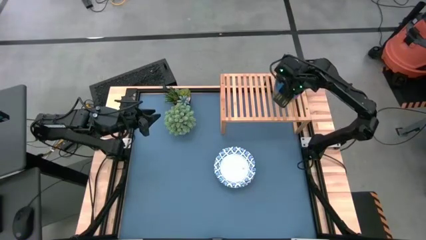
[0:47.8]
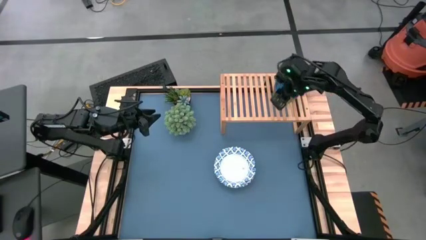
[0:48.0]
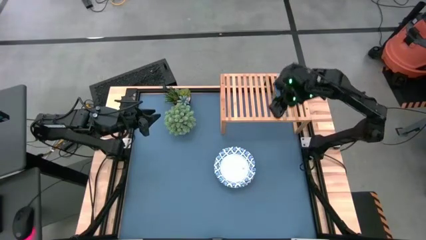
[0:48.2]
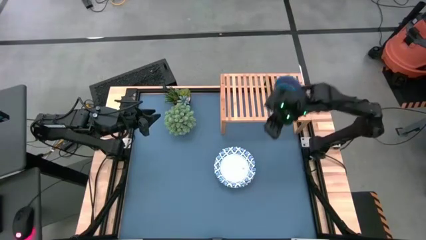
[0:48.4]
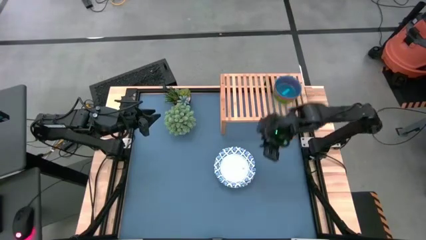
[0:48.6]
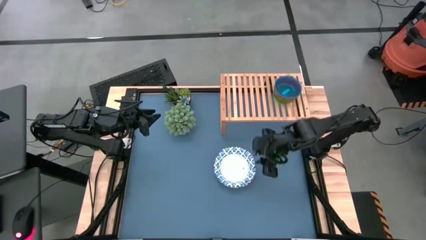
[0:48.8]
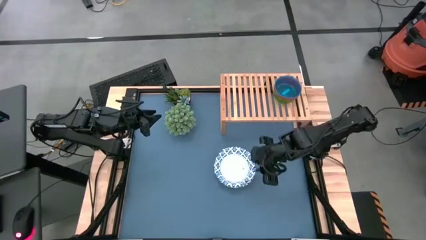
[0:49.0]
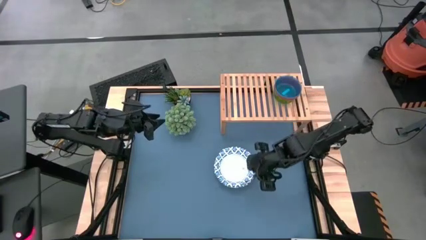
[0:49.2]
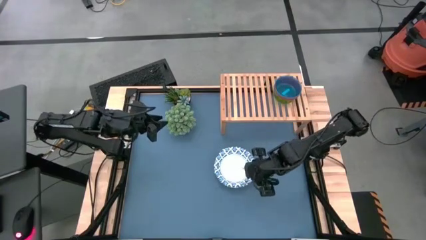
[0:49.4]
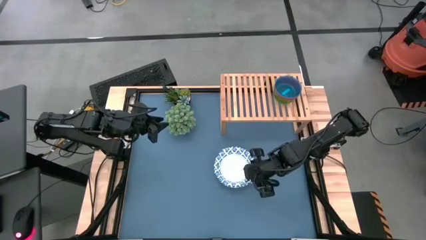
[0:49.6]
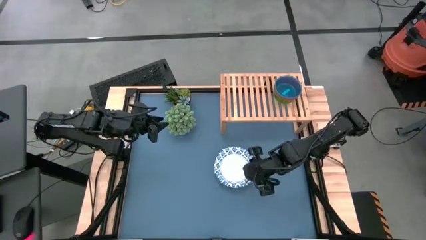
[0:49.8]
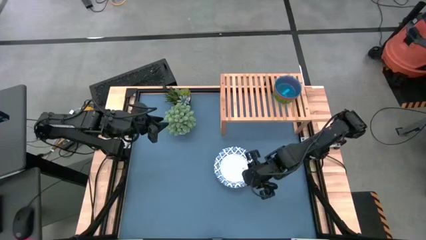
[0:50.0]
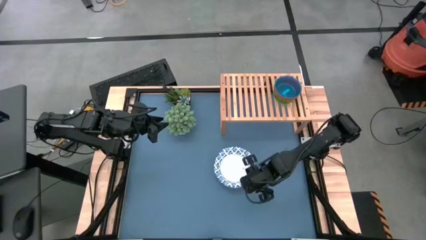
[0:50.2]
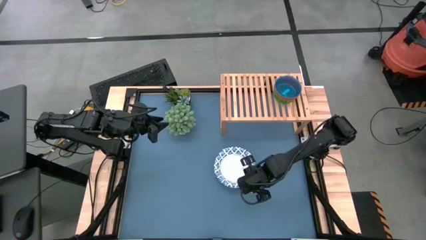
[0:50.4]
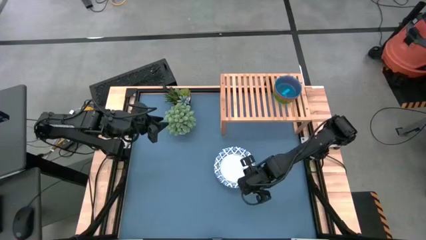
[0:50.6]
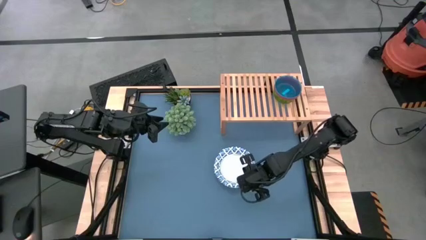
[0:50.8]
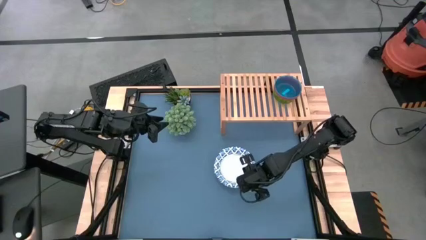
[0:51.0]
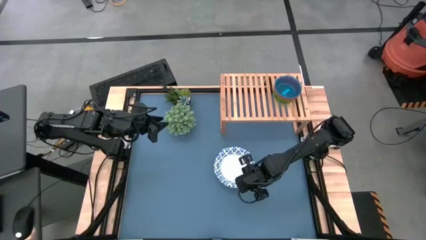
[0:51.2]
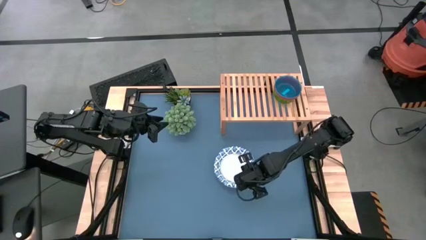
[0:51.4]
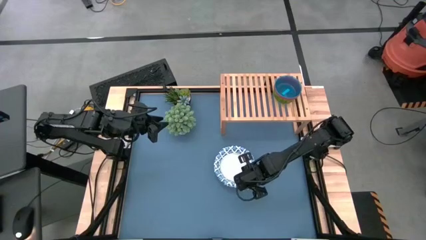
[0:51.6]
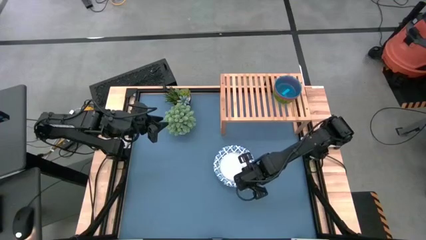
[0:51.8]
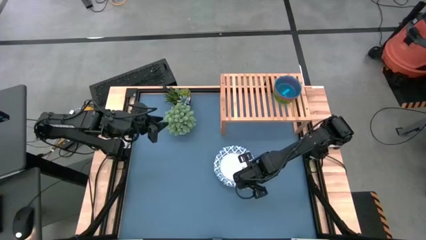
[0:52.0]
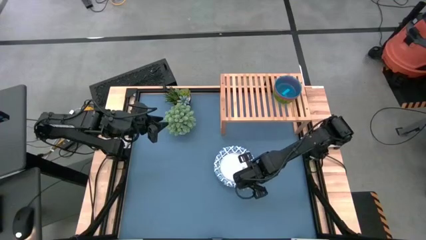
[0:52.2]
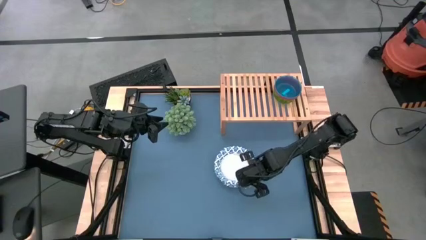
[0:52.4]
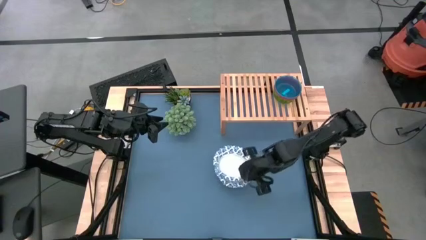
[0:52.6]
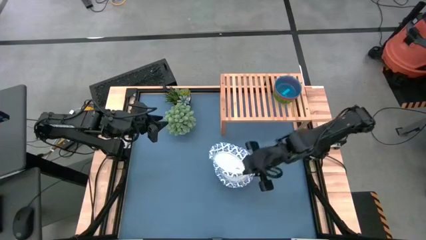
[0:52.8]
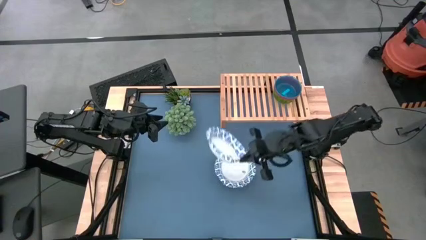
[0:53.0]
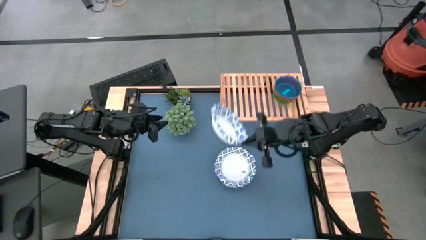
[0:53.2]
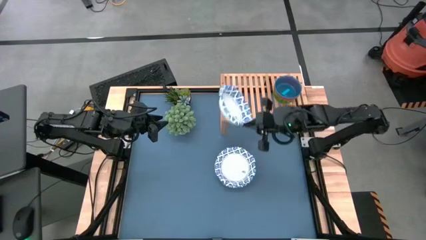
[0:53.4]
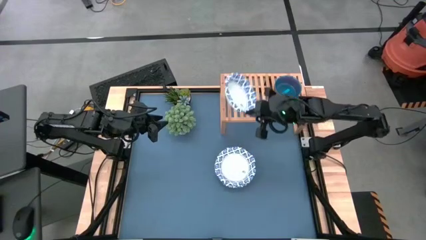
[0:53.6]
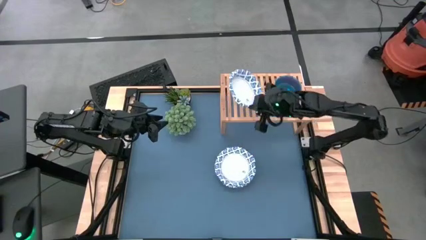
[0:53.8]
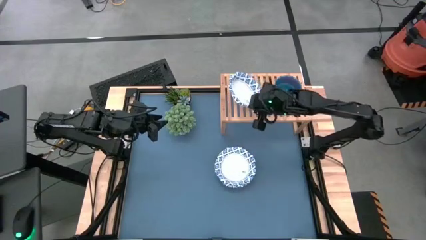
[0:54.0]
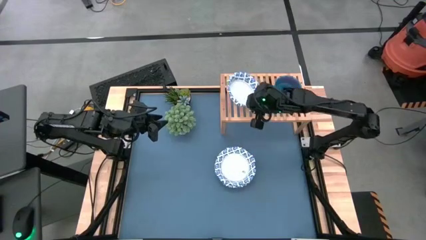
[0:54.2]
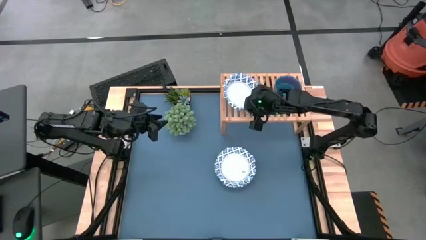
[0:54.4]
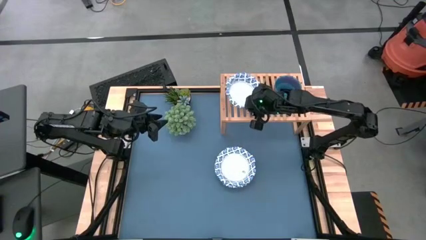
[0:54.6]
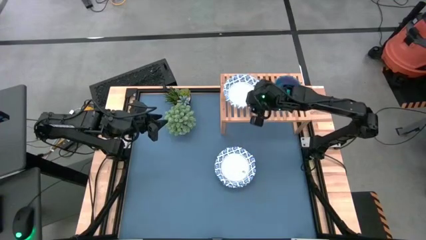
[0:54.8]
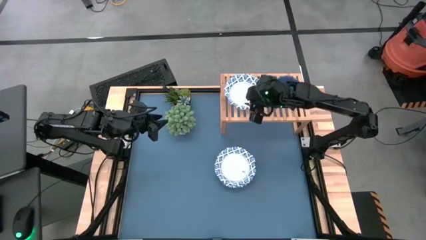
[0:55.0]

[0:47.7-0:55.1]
Task: Place and stack bowls onto a shelf
Put the blue bowl on the shelf

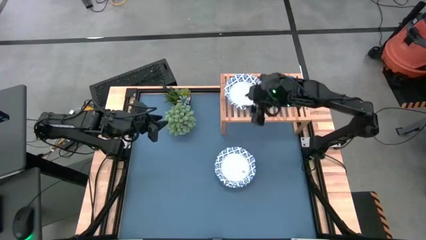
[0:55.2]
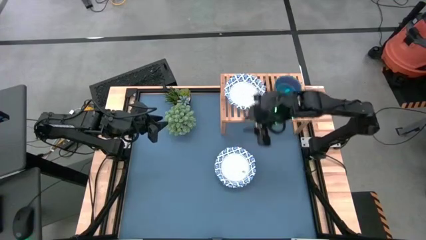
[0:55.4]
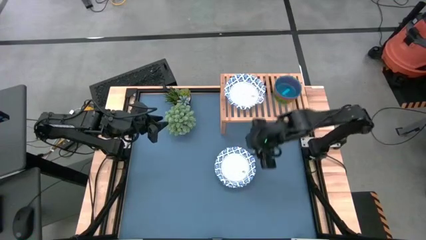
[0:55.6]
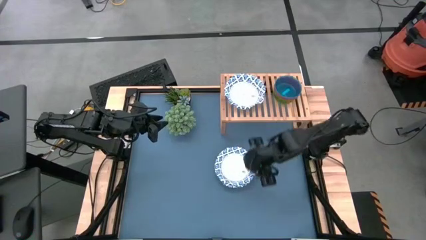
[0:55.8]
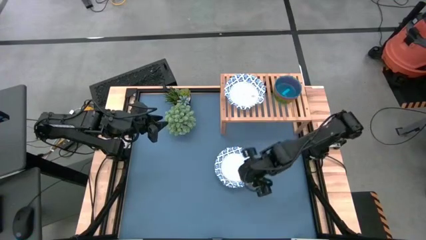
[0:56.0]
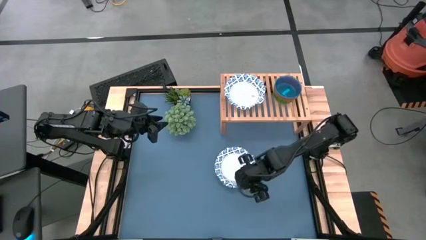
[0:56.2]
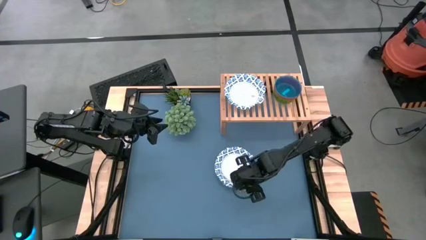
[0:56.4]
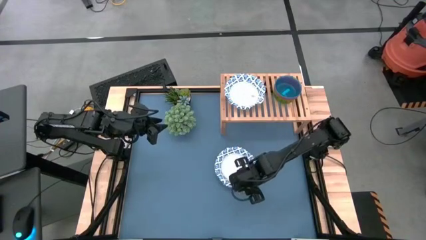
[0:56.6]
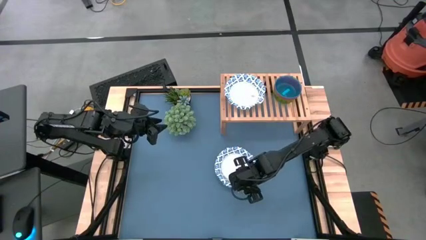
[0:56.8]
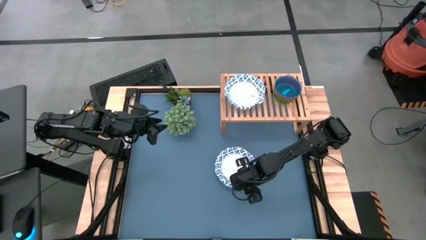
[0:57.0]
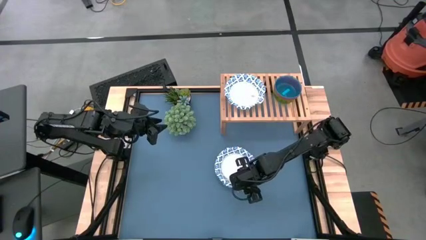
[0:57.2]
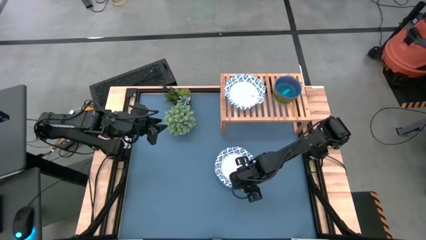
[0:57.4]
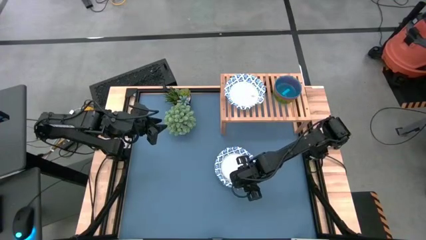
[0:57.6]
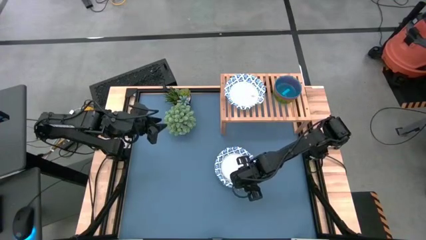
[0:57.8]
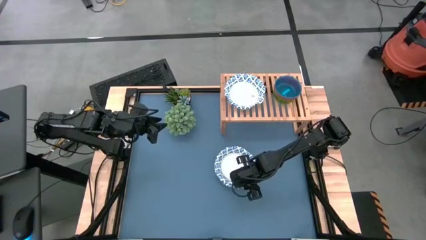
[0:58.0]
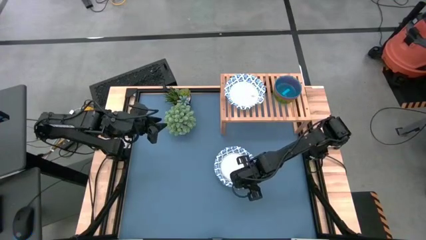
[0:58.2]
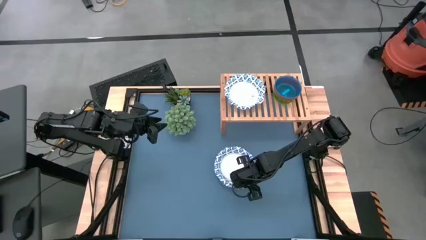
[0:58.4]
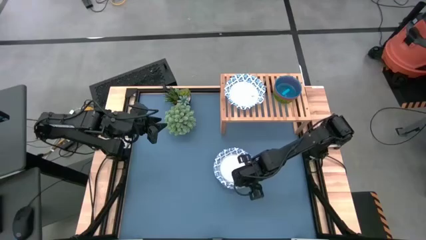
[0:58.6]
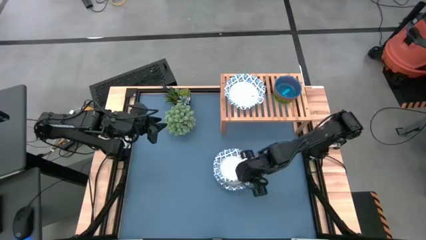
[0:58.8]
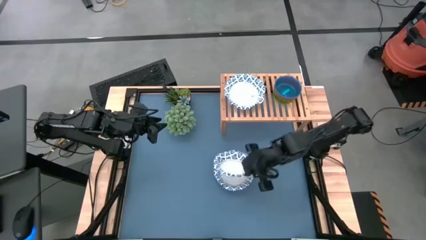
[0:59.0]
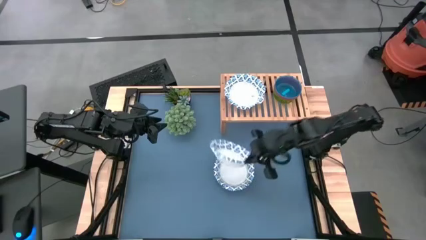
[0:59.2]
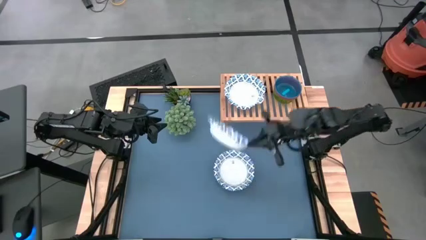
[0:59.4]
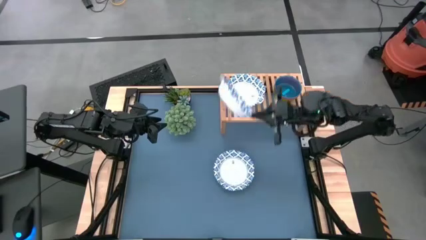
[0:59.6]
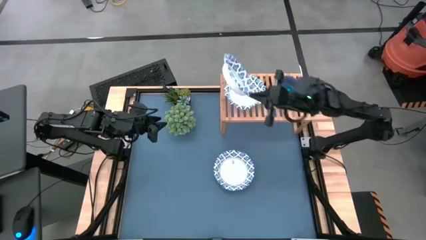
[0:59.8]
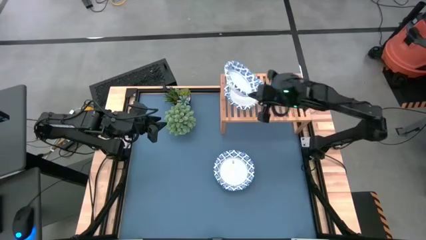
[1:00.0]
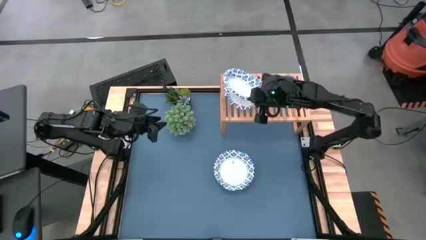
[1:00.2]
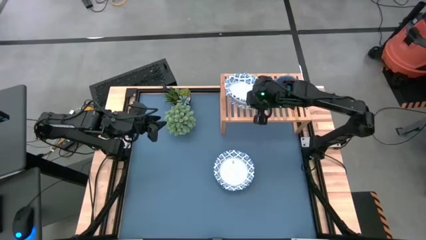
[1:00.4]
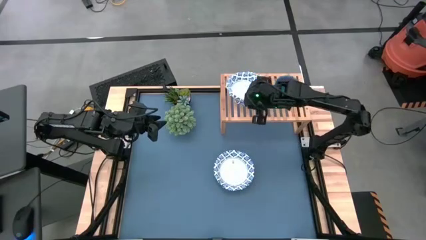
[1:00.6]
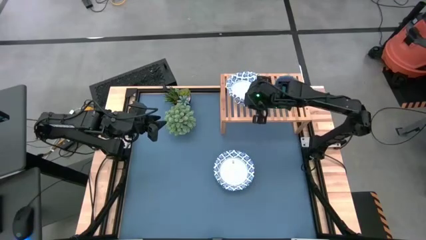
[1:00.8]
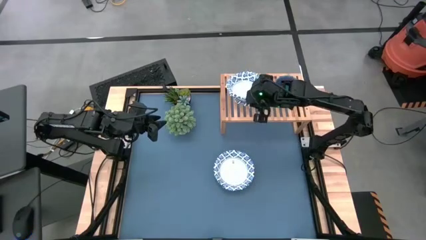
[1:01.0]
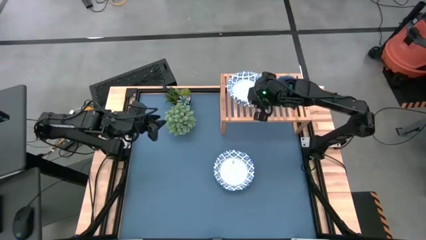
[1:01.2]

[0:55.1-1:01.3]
Stack the blue bowl on top of the blue bowl on the shelf

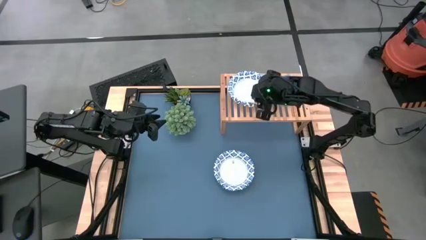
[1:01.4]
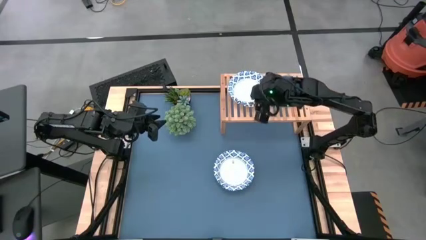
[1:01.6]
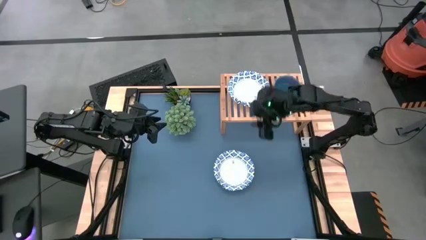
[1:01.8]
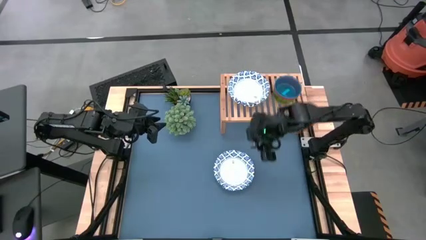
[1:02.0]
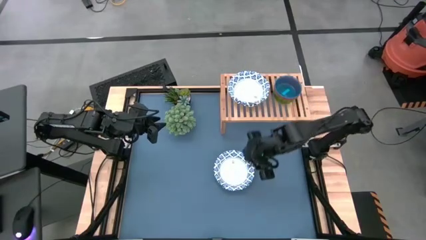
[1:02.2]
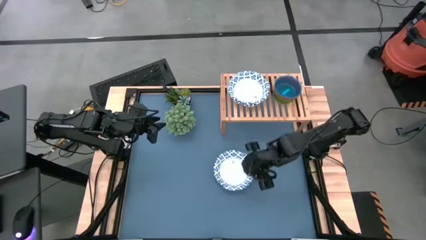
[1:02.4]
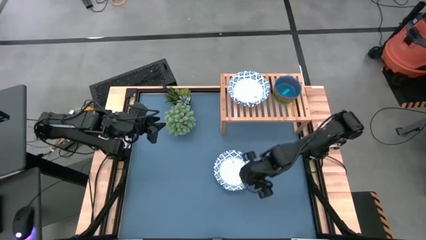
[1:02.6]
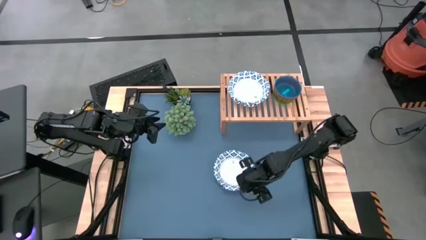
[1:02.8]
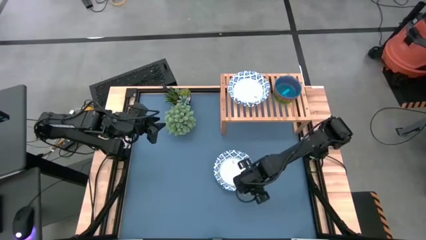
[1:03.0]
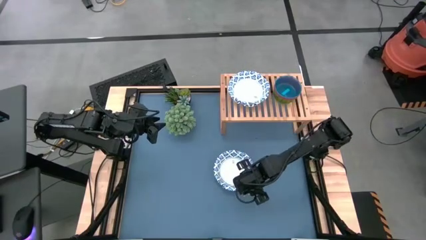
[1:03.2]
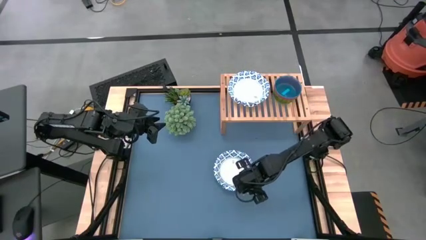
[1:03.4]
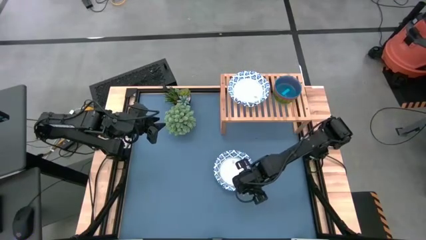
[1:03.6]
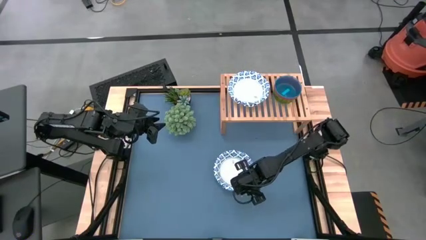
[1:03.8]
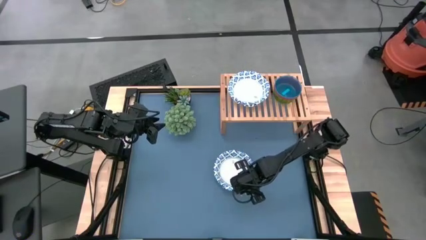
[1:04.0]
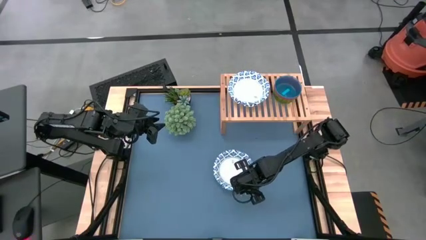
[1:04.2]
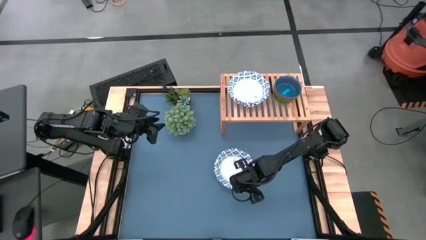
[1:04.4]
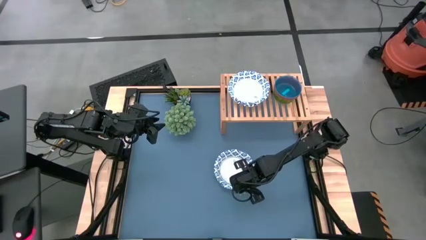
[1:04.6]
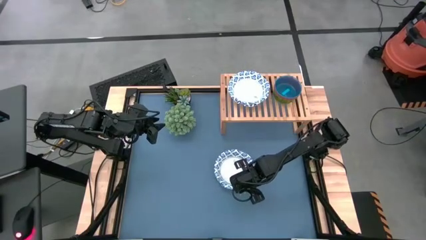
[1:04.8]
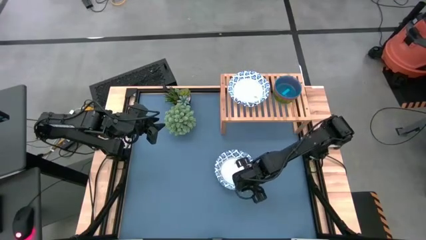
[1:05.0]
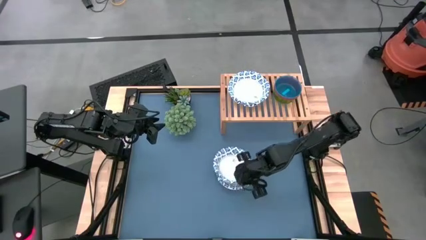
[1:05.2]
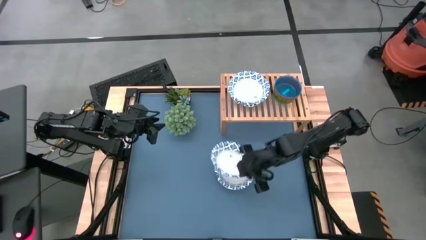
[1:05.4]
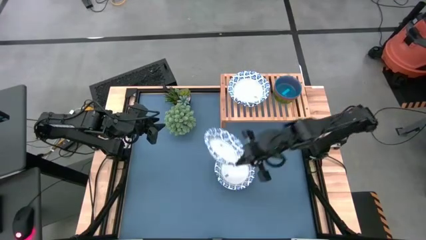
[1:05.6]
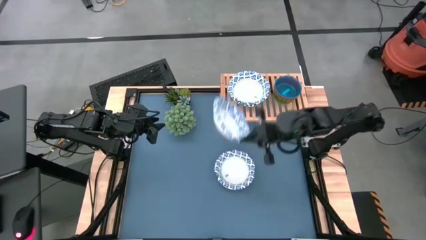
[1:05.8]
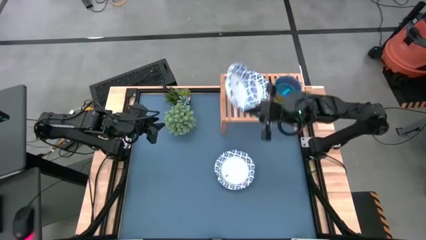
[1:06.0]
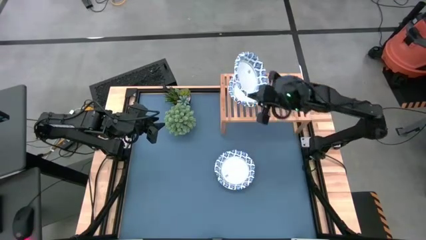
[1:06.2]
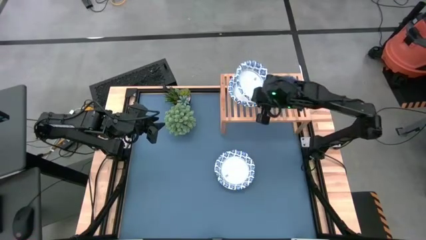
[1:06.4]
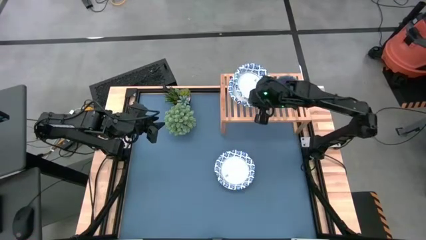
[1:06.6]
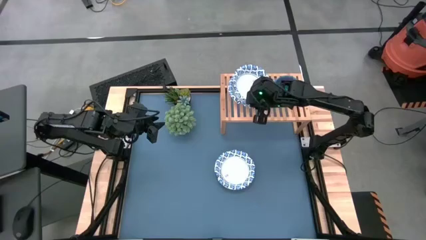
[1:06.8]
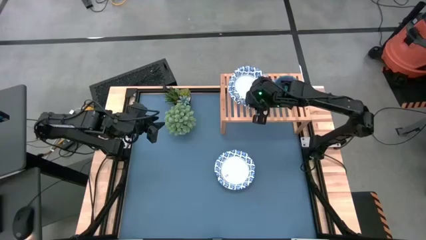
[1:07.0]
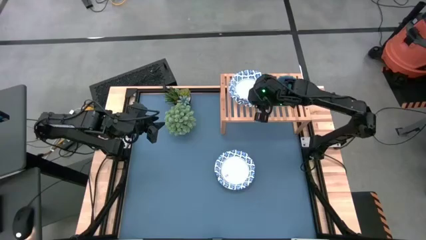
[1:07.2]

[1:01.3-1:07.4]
Stack the blue bowl on top of the blue bowl on the shelf
